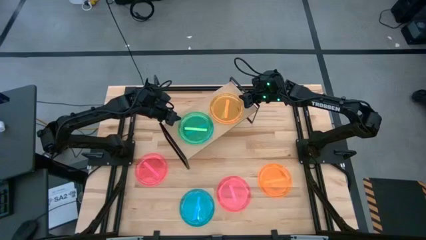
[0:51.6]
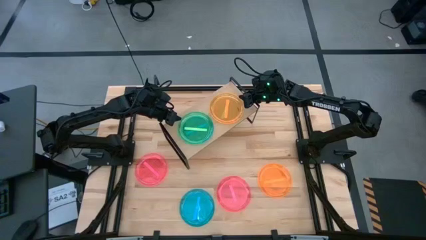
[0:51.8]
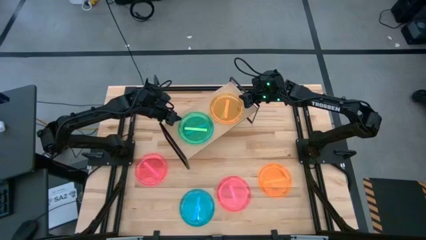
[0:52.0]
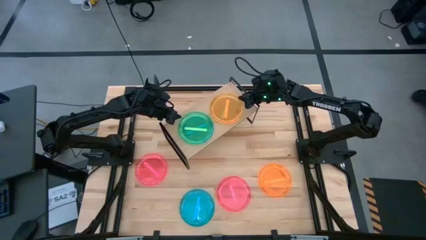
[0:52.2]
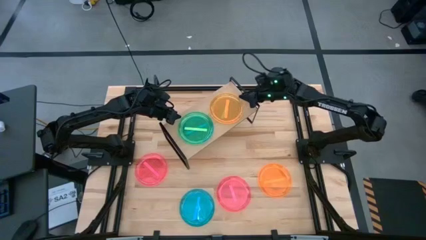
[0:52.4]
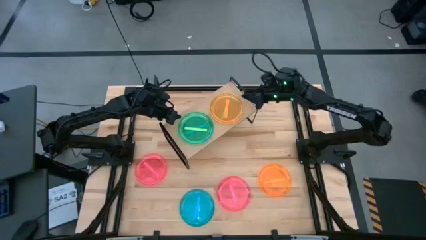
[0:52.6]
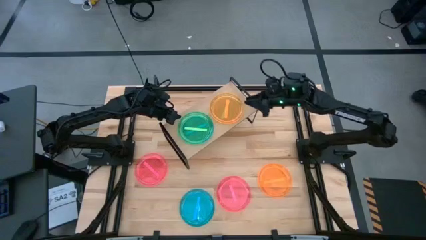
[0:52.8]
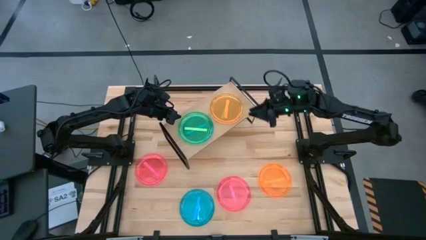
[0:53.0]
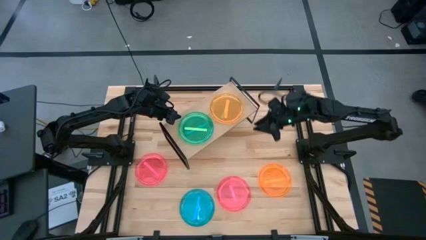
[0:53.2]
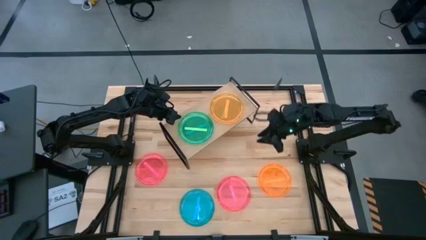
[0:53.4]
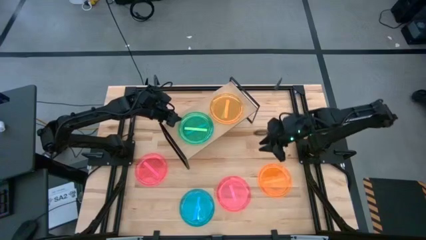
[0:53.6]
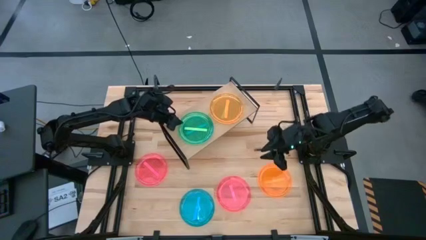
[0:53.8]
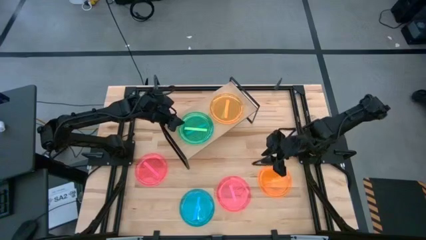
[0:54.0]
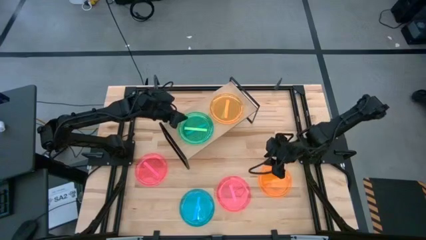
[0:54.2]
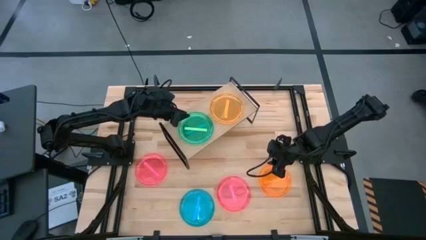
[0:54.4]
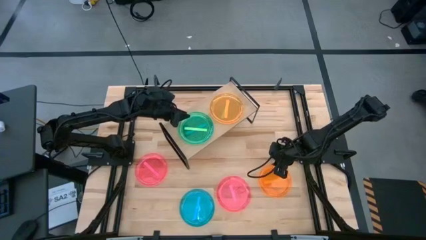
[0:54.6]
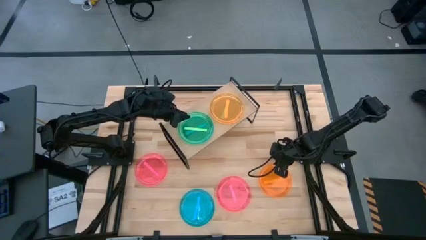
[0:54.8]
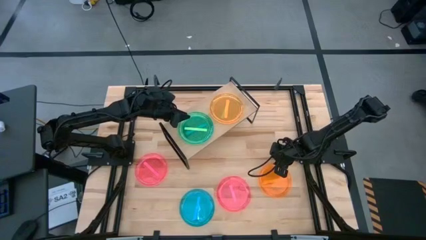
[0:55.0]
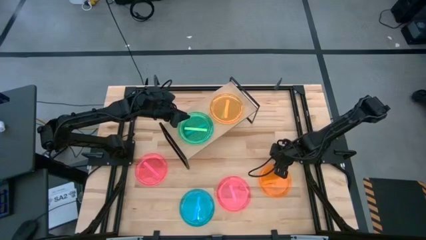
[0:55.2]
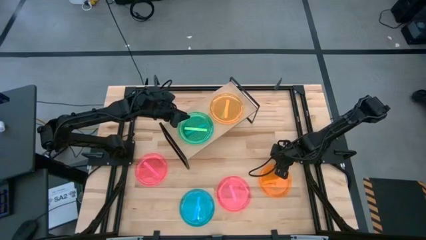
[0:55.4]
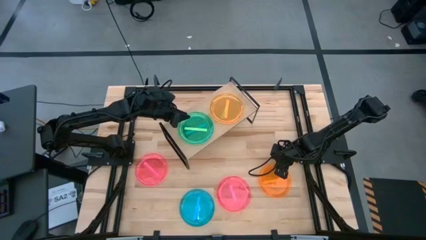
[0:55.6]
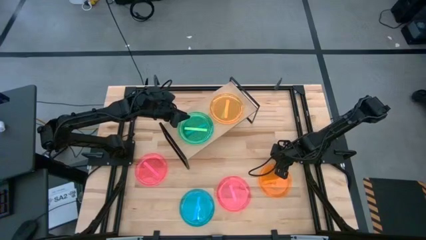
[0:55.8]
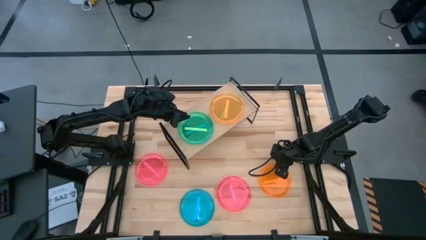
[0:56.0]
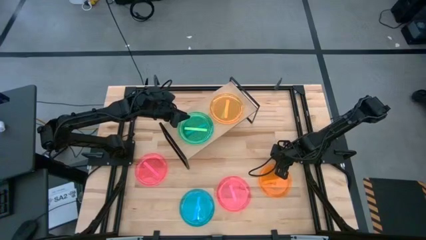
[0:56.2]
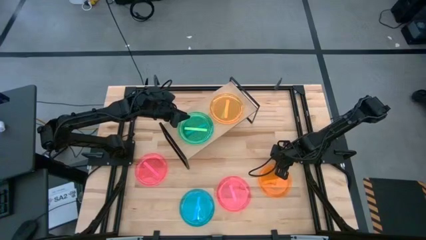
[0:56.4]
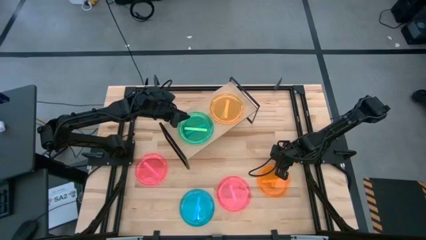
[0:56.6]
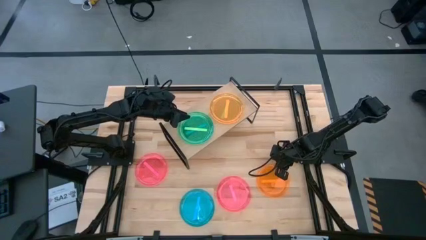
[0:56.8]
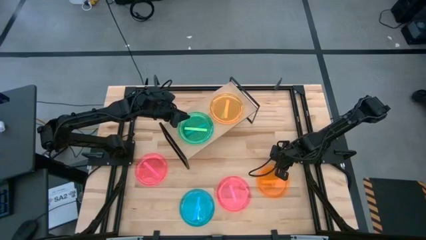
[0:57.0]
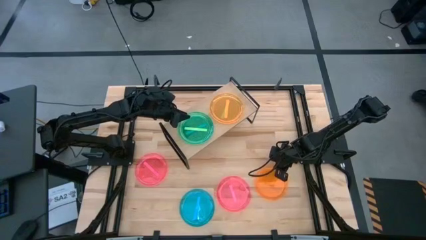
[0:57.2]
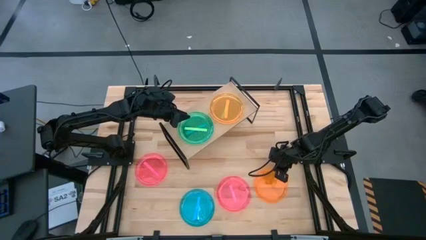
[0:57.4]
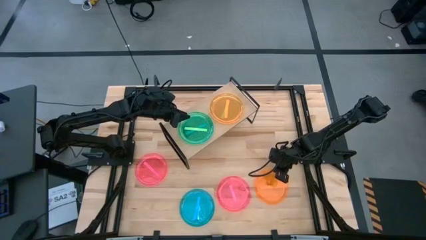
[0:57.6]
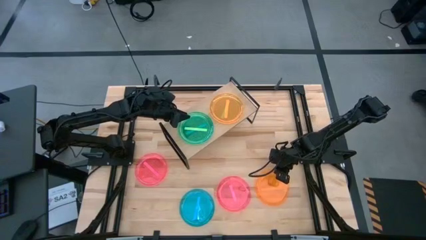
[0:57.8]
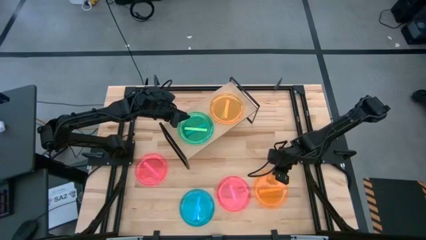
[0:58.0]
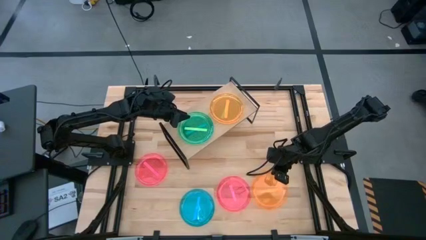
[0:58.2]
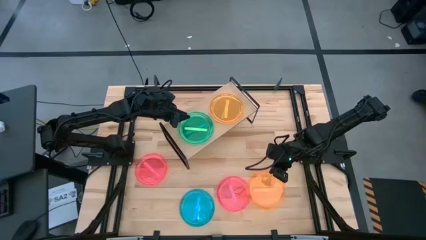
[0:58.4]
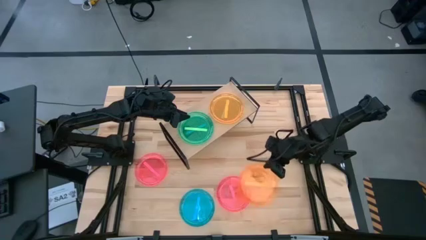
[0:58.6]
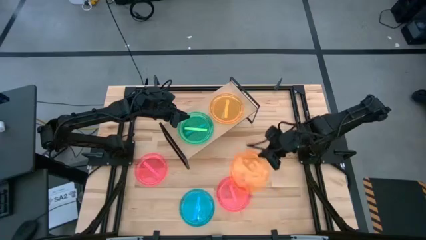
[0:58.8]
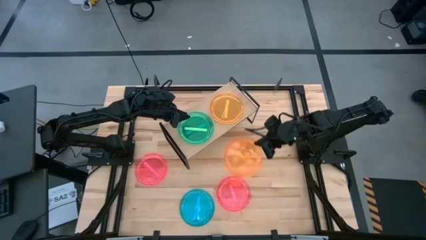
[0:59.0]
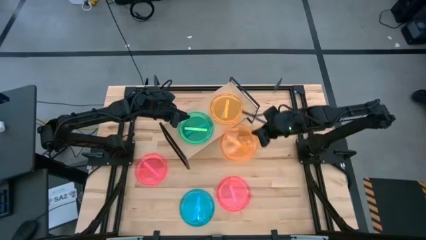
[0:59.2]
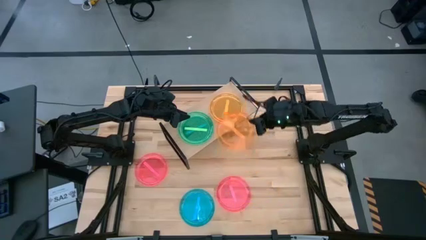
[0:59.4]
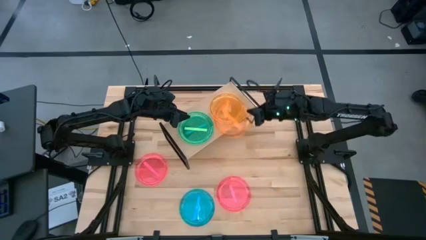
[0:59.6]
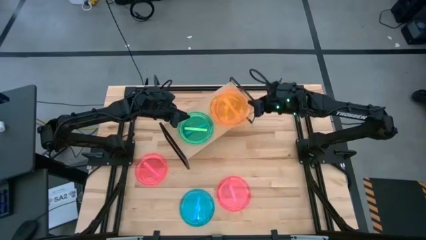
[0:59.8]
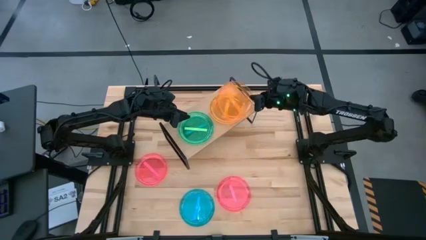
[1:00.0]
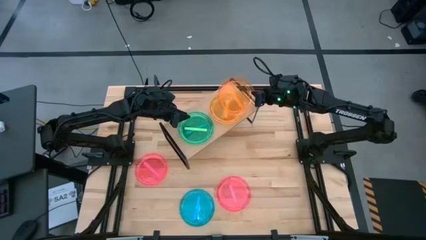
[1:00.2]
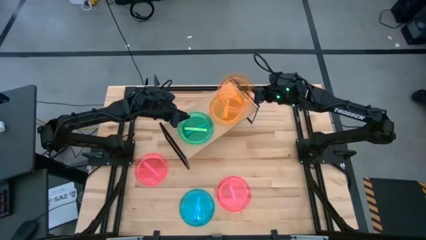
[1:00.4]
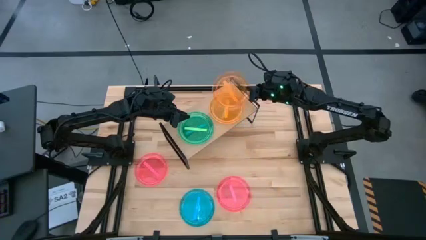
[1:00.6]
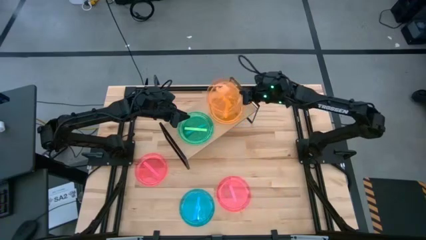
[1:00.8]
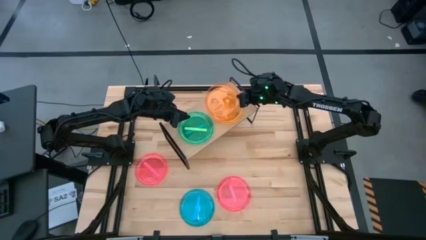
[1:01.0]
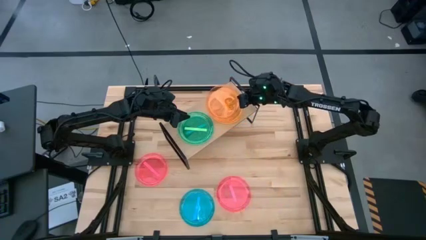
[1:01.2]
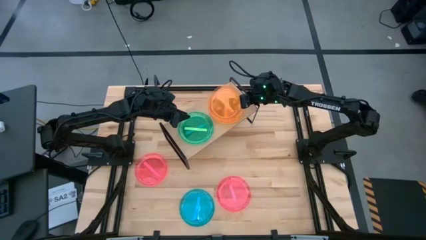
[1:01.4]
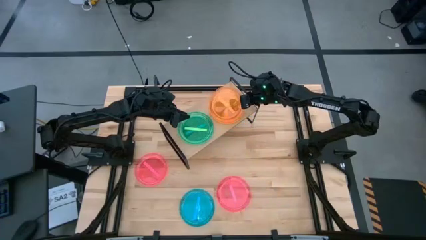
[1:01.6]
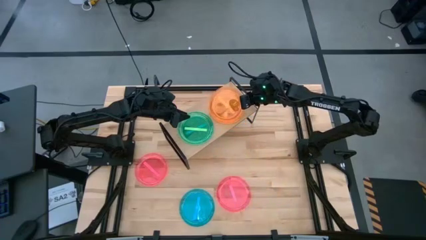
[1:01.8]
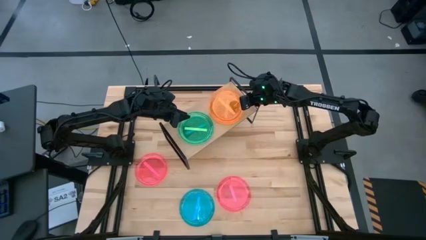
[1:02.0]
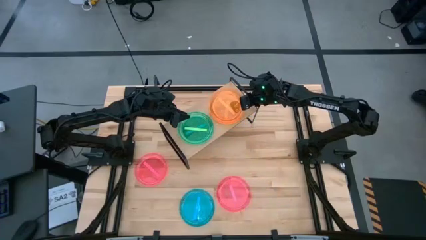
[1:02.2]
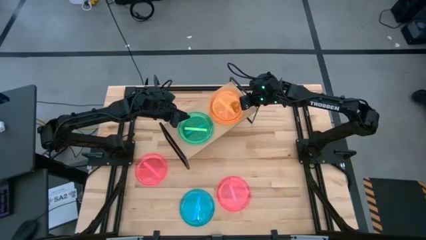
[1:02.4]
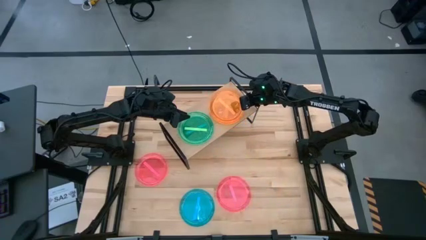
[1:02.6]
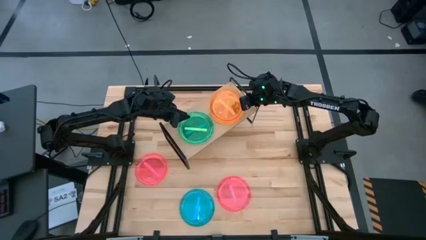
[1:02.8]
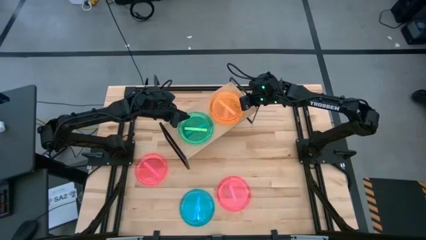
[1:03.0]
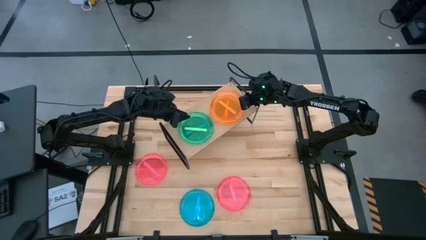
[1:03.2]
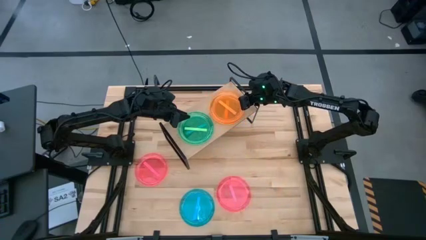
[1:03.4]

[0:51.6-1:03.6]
Task: Place and stack plates onto a shelf
Stack the orange plate on the other orange plate on the shelf
